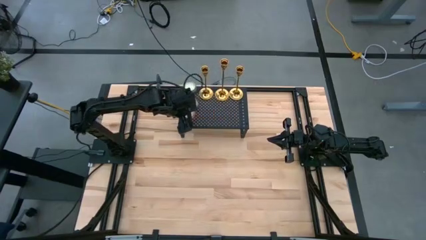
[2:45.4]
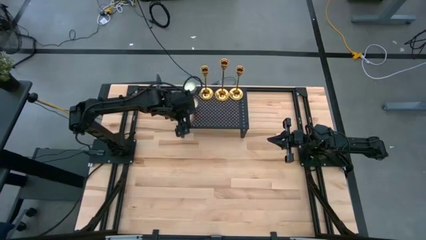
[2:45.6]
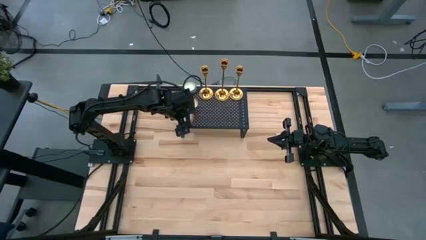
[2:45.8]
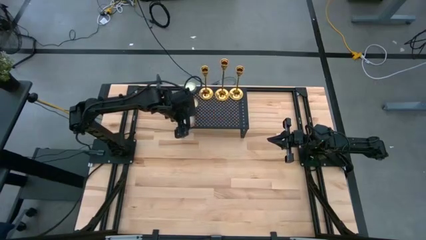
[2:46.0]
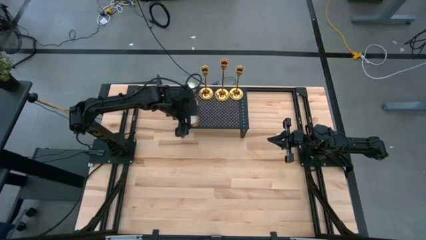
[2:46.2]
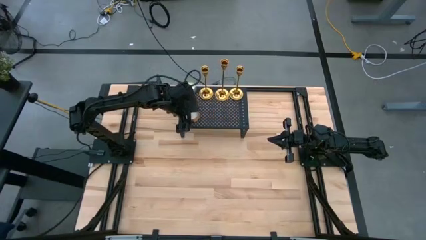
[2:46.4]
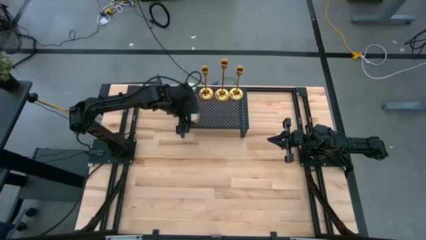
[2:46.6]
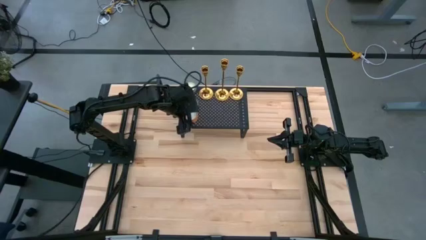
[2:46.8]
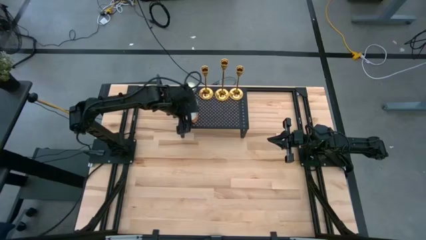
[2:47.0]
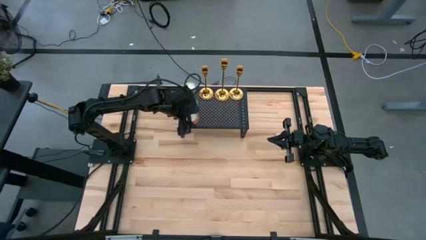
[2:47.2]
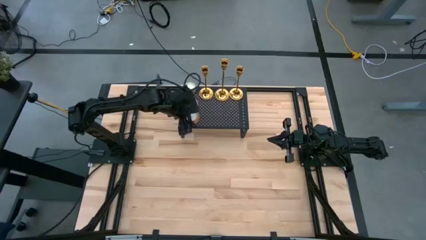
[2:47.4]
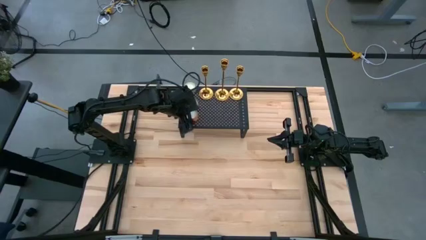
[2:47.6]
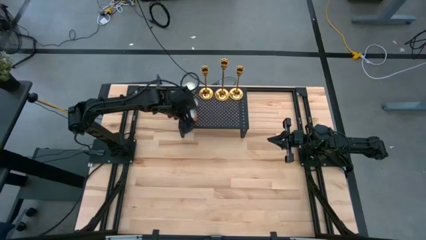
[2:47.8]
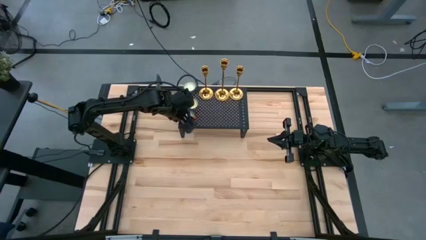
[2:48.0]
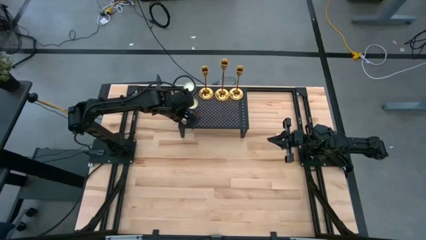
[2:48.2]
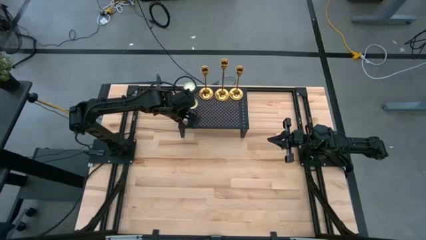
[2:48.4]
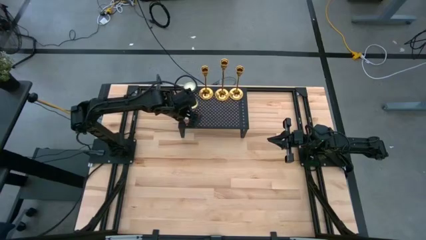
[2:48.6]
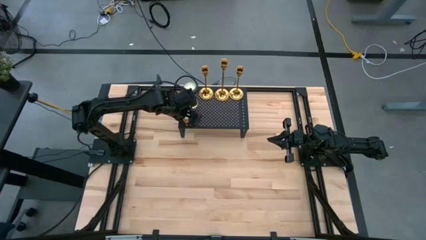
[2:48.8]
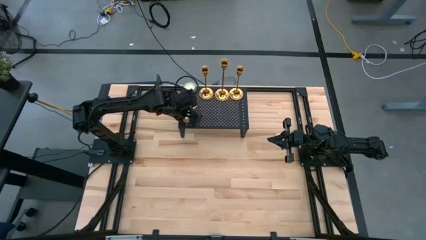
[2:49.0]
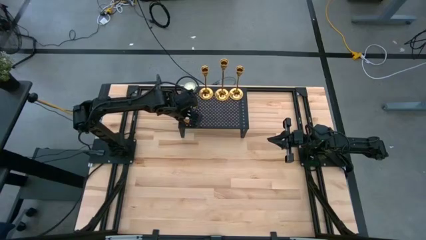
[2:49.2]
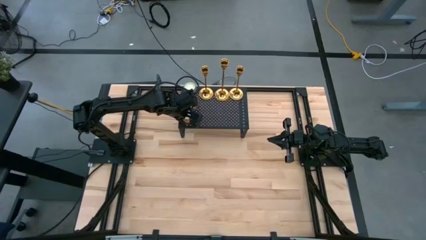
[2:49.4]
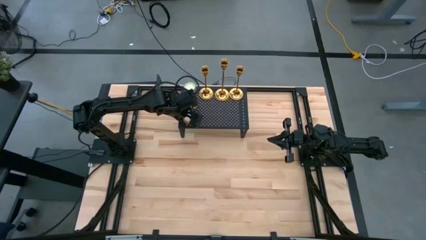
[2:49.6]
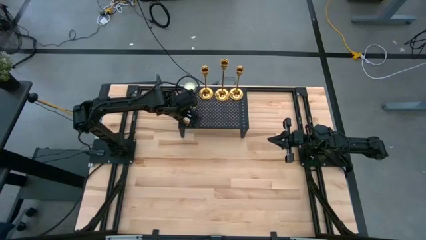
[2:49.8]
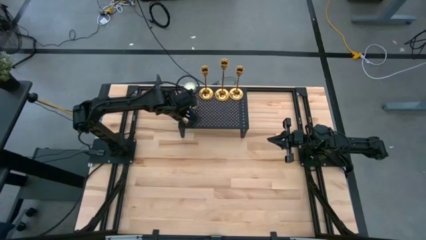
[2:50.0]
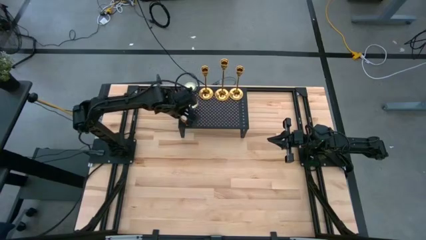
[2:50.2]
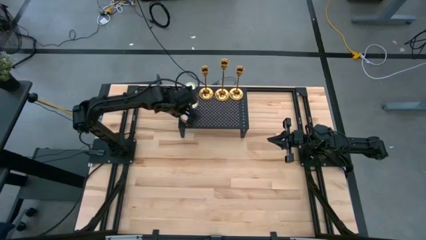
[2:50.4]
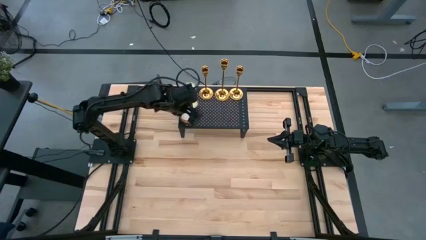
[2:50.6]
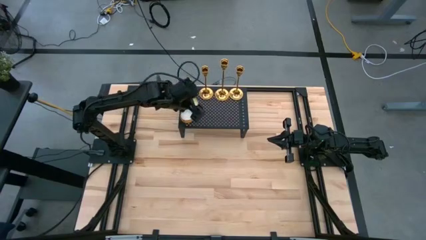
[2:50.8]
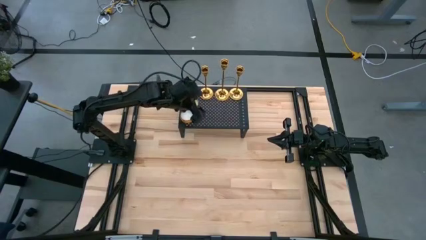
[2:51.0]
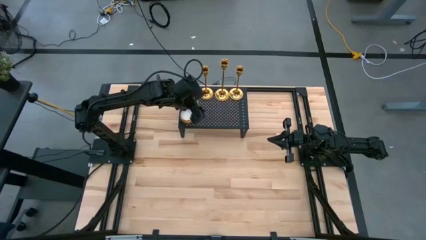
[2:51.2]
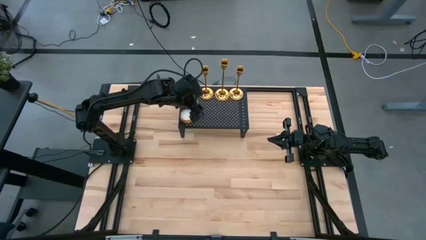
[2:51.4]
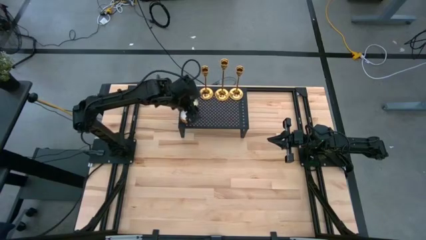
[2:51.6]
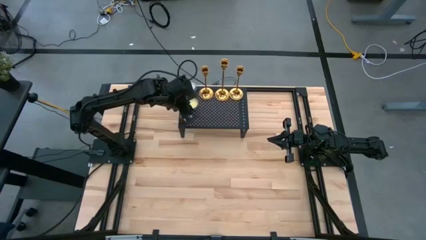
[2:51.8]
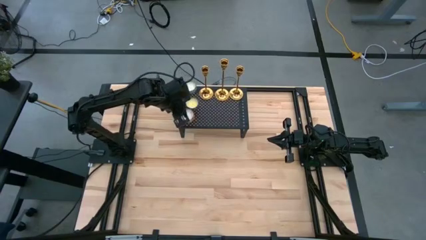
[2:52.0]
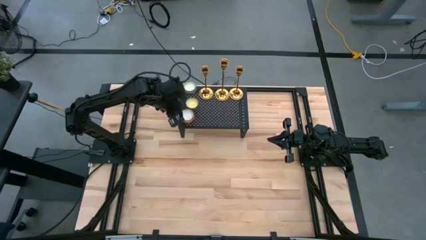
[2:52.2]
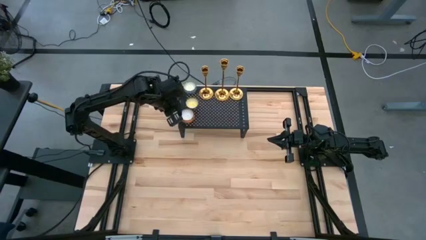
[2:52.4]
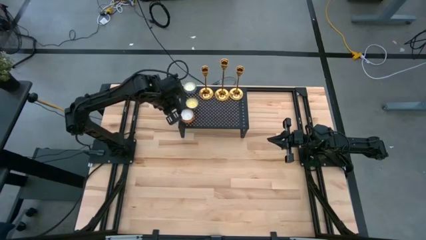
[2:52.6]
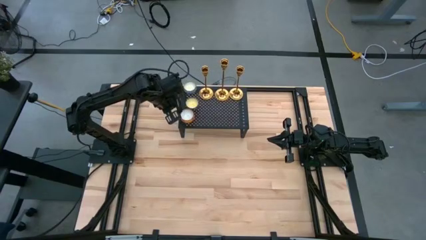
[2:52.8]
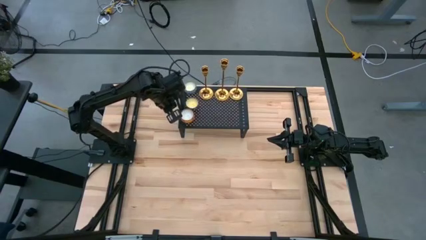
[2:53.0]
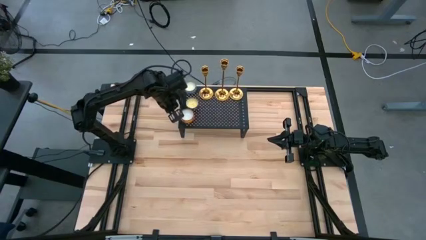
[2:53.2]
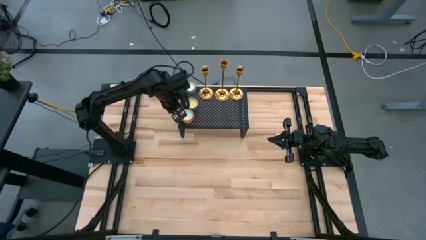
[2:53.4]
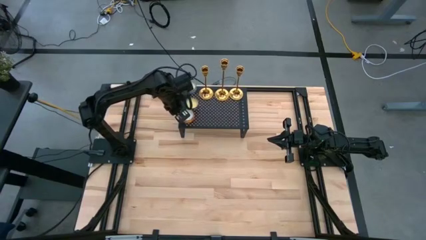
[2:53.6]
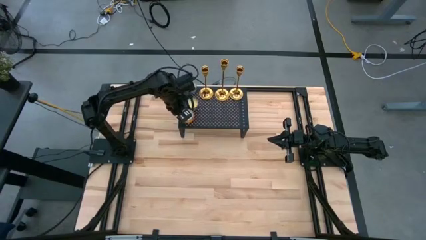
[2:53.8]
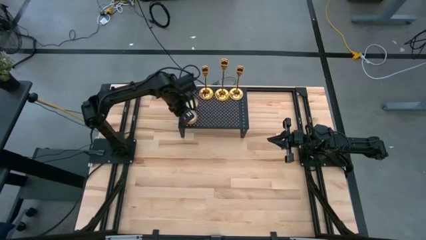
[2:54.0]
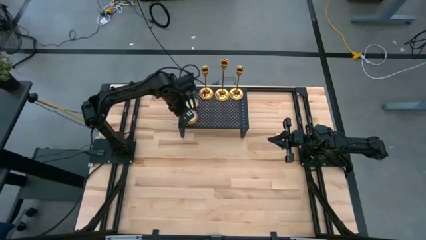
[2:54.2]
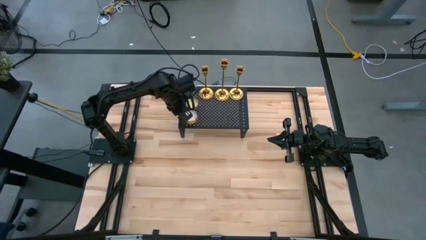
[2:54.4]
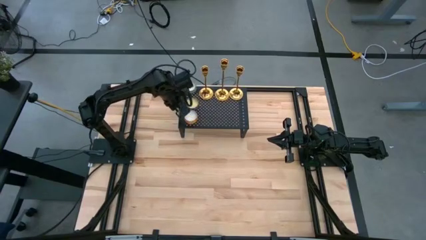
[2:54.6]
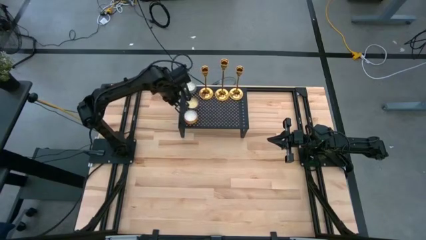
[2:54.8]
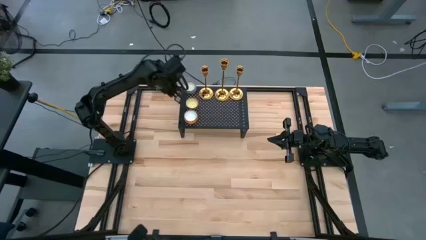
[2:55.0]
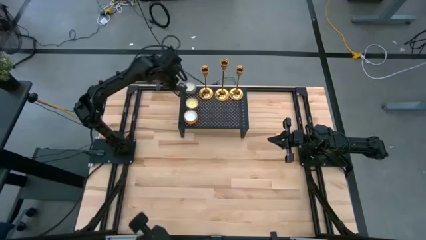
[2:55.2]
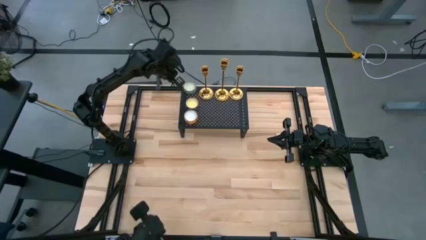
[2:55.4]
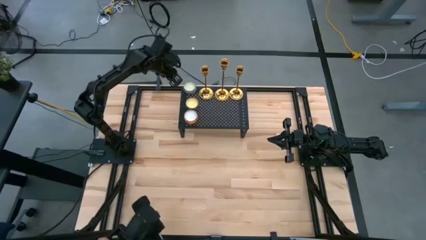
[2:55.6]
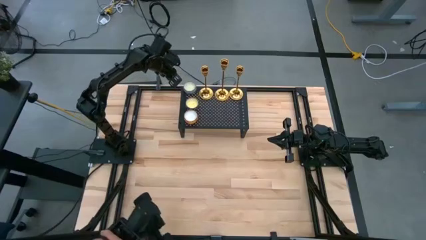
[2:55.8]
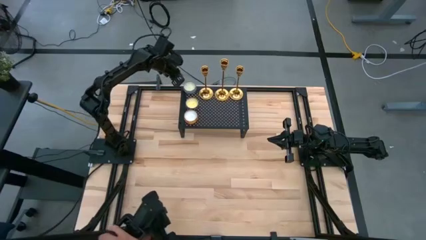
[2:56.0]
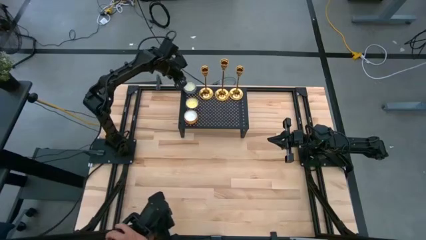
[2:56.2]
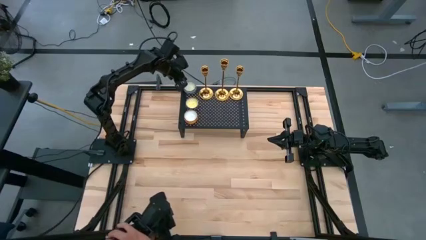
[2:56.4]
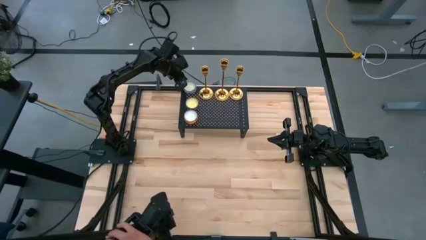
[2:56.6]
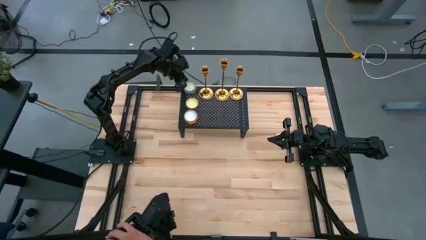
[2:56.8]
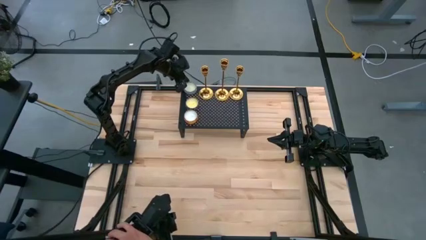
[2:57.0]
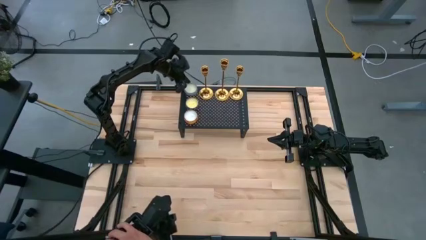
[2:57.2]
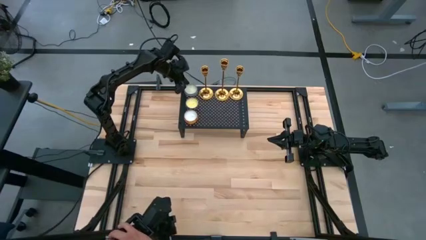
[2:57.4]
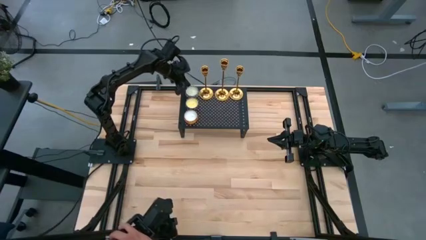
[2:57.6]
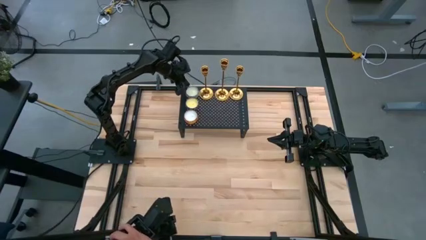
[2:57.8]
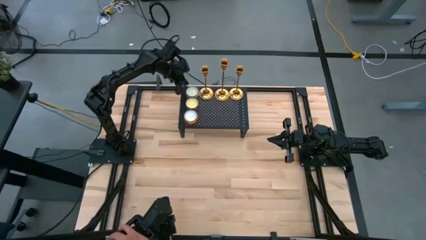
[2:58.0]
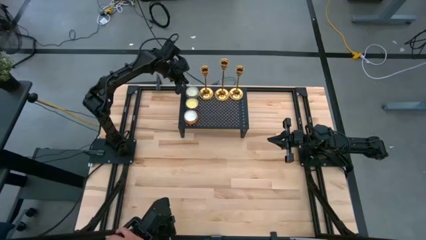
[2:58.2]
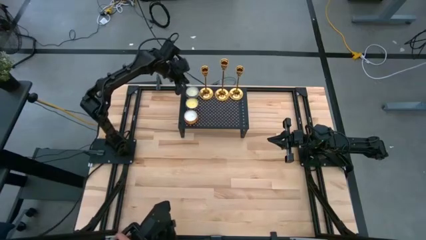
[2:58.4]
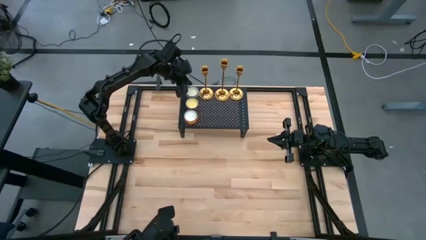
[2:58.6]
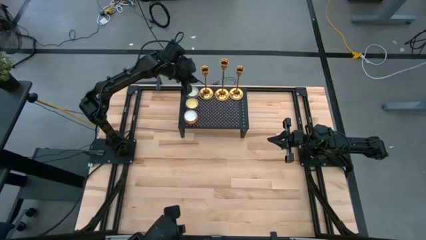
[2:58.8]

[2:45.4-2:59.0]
Task: Pick & Place candle stick holders
Adjust the scented candles on the shelf
